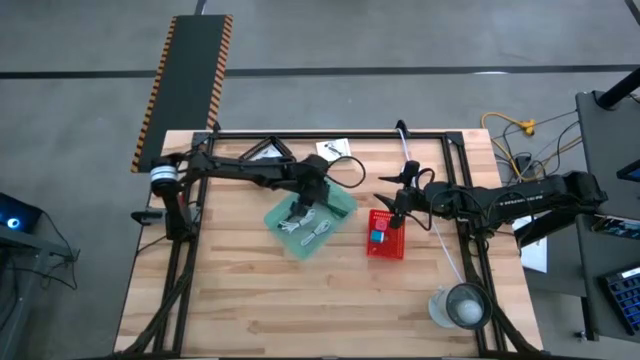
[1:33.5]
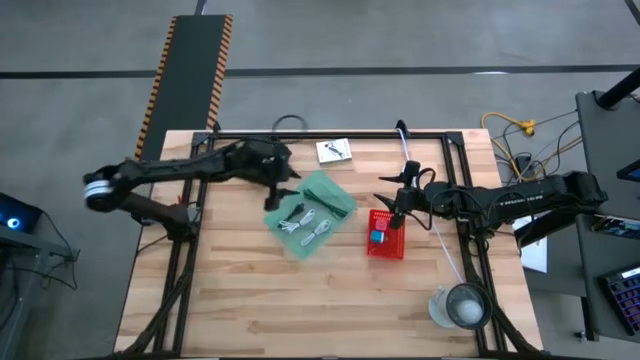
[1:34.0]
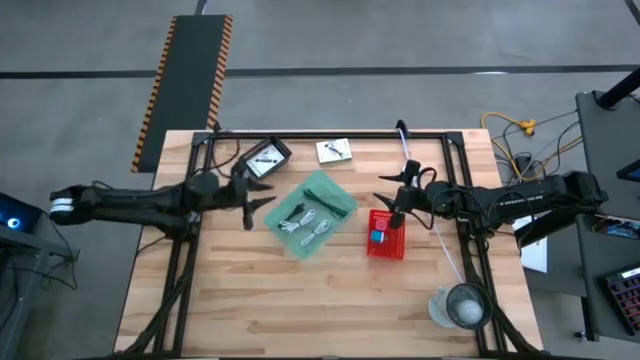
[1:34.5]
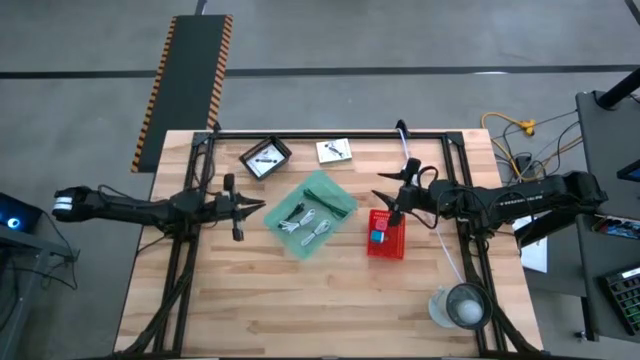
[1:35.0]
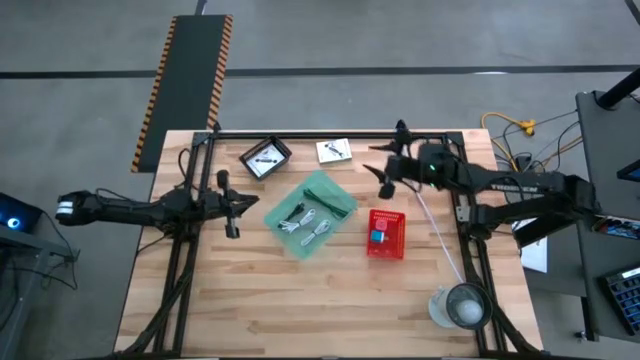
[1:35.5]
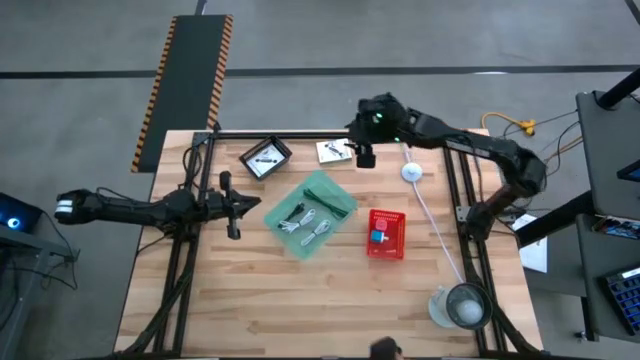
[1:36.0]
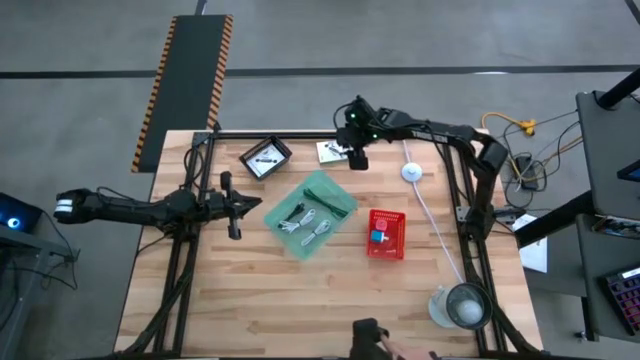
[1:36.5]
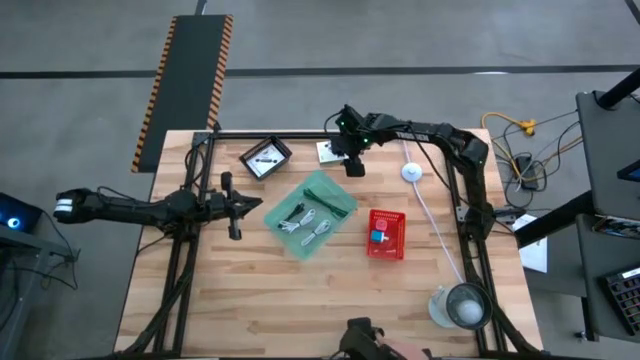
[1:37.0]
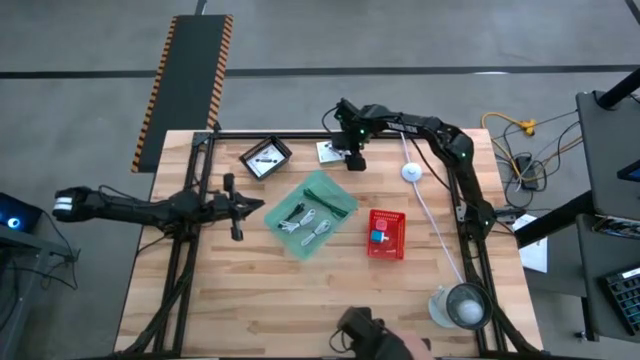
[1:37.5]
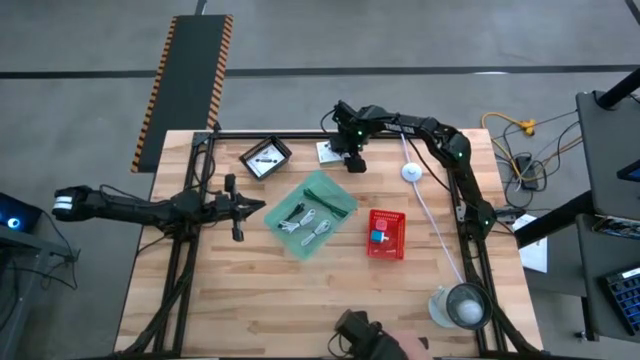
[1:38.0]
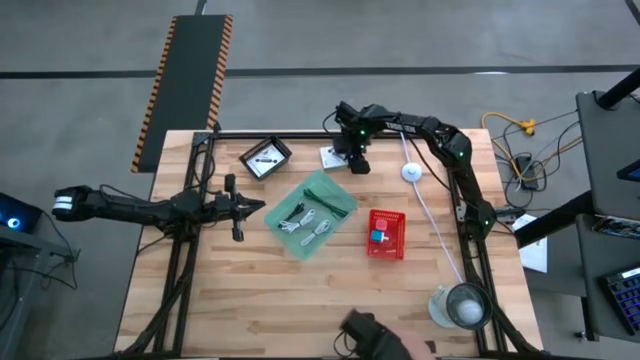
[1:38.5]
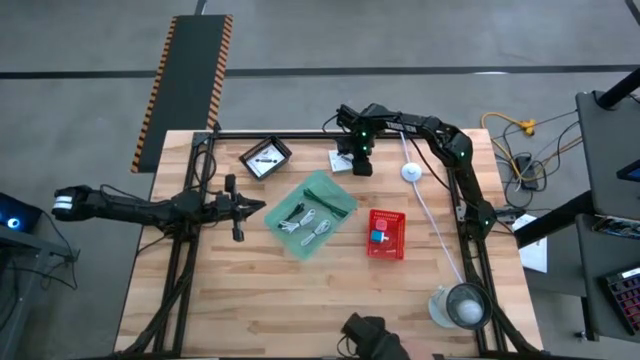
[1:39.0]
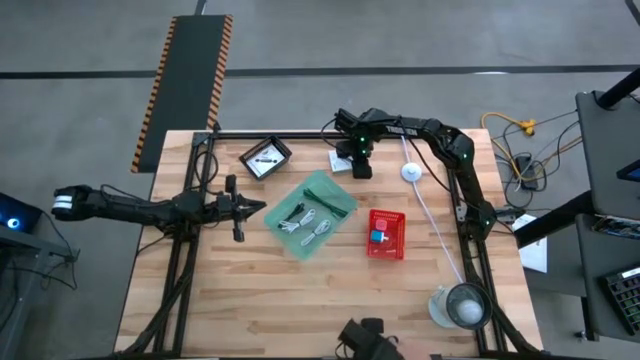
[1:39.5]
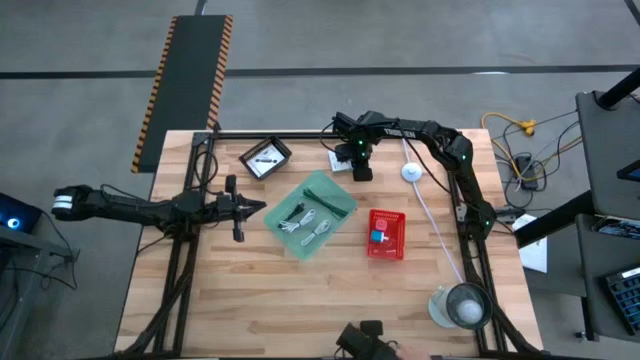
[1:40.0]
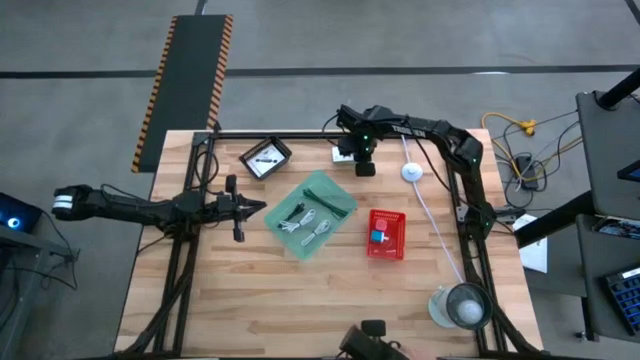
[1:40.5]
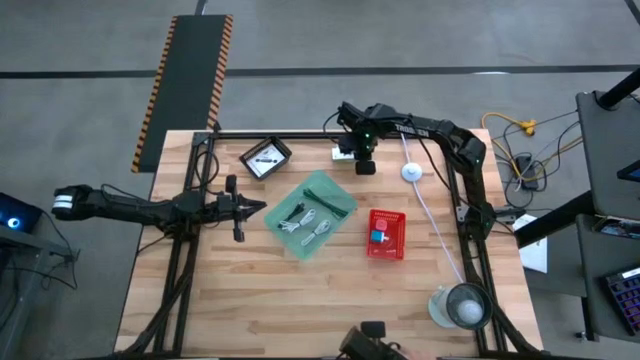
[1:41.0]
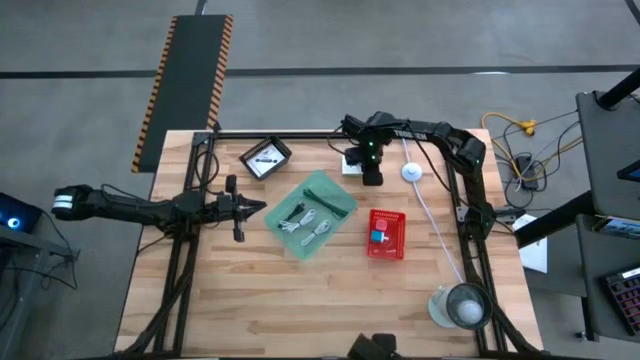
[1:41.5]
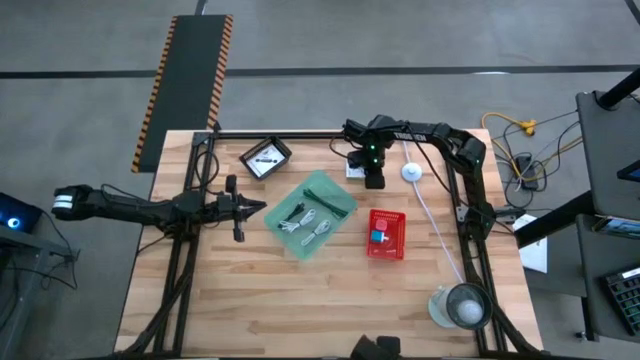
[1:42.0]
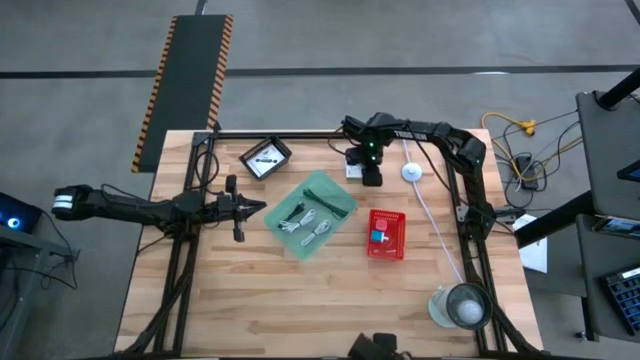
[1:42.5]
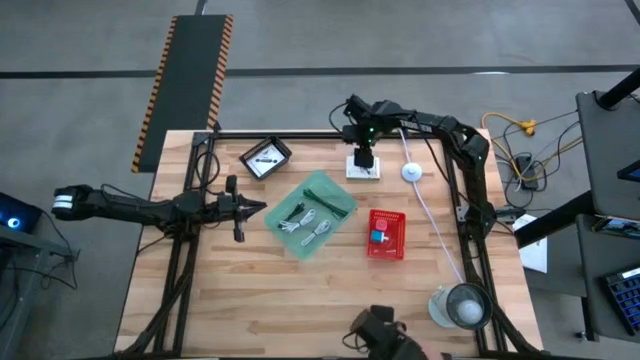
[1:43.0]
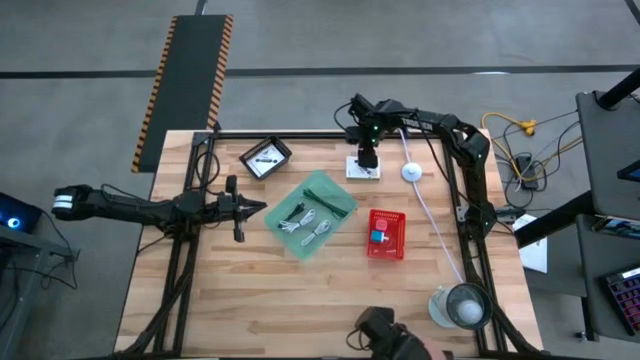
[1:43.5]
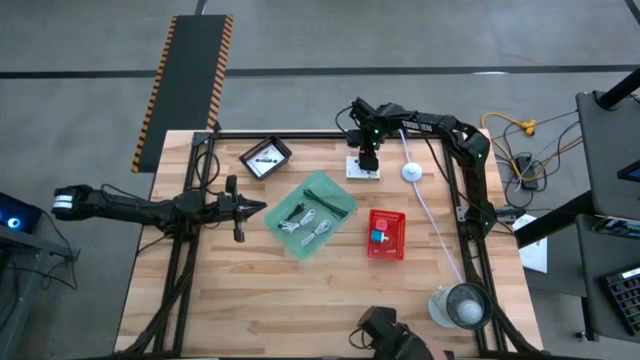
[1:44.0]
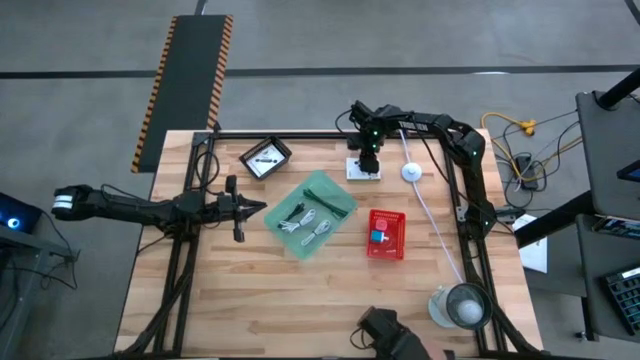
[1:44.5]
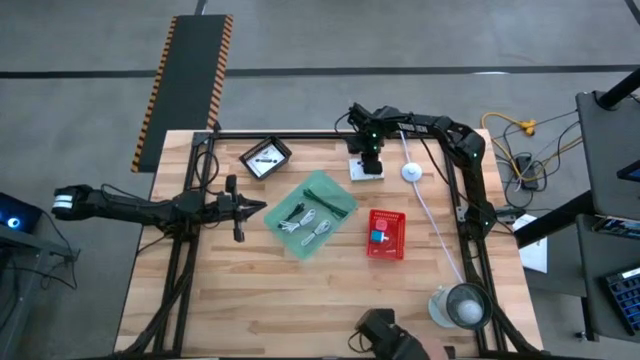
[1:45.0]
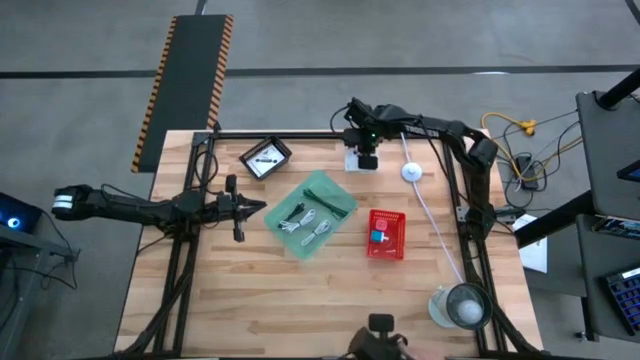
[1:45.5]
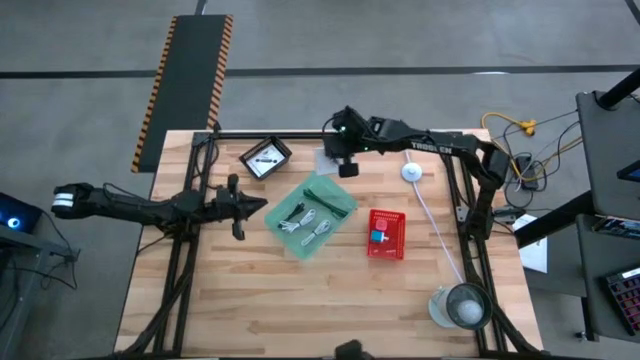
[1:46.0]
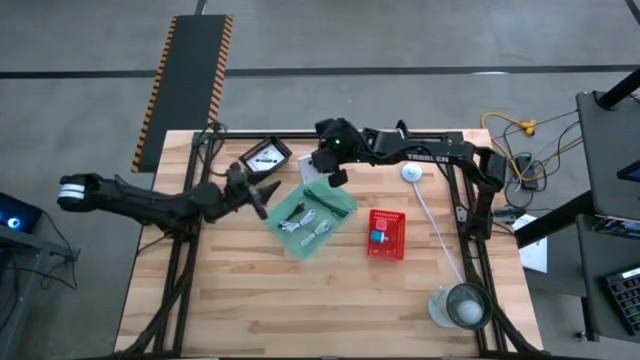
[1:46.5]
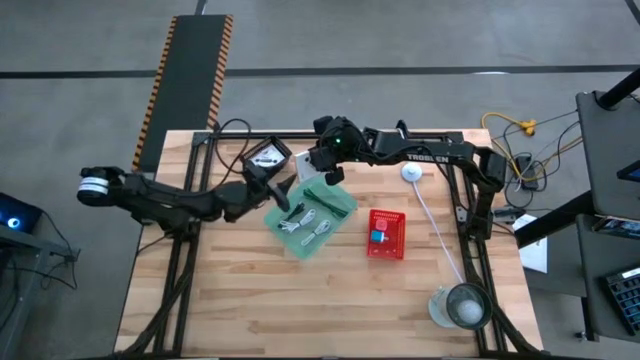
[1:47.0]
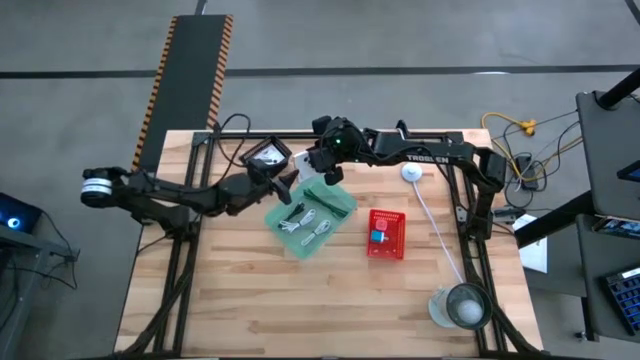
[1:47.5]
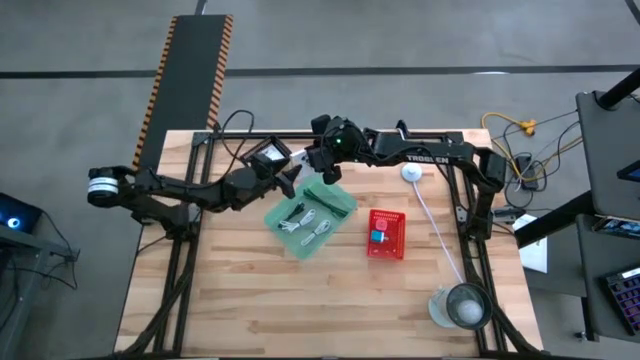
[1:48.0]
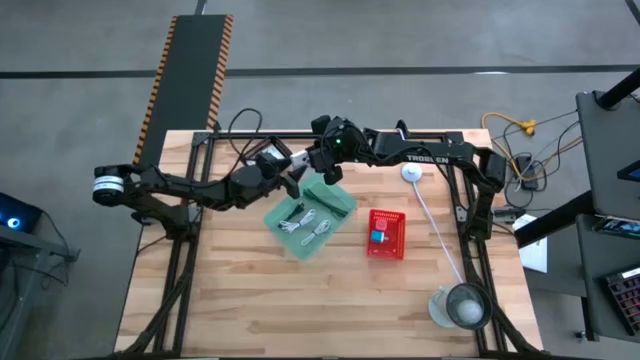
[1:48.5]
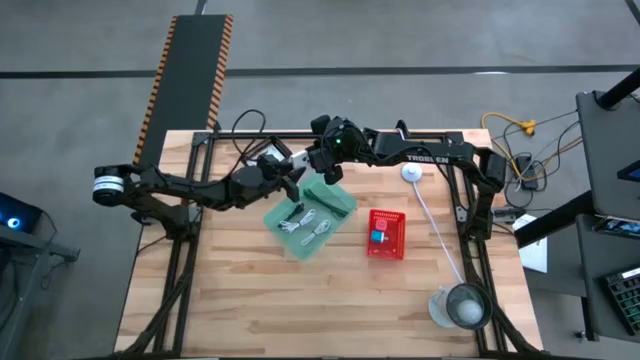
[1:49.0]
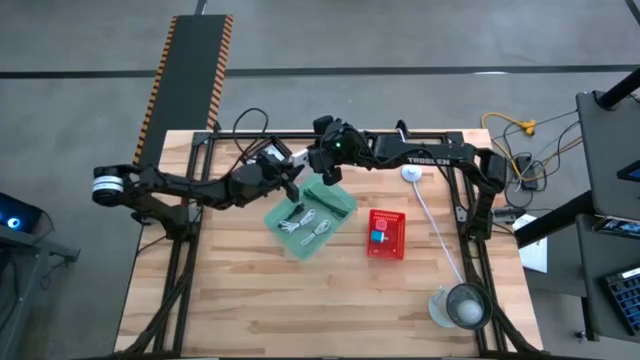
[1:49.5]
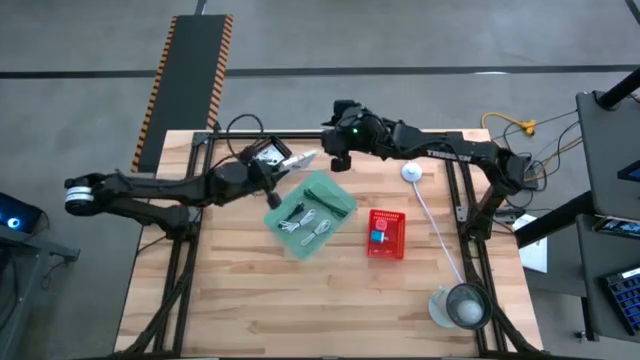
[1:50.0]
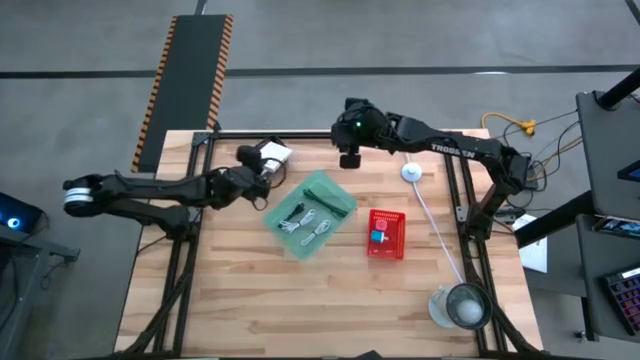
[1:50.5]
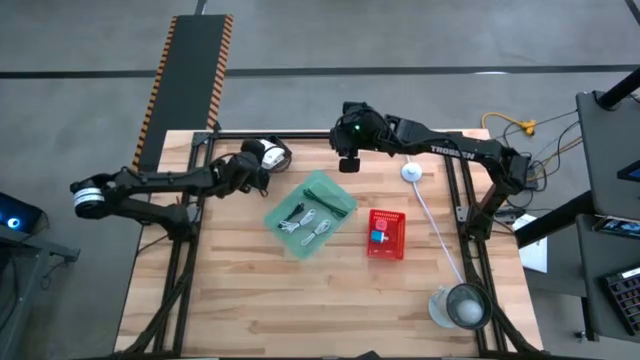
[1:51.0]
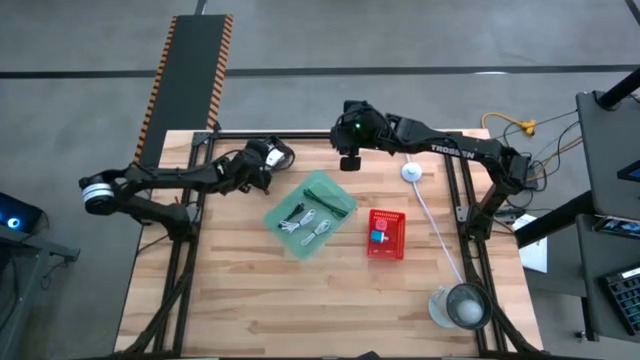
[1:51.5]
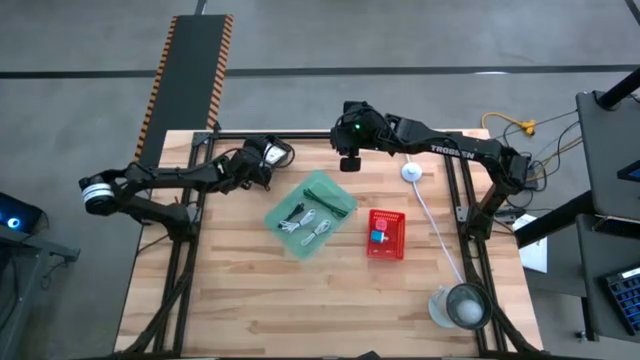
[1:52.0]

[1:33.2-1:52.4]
Task: Pick and place items into bin
Put the white card reader box into the black bin

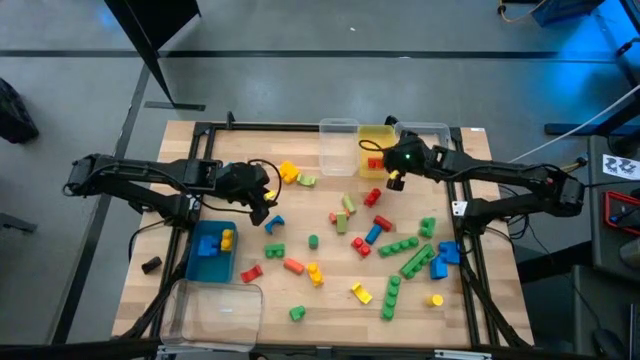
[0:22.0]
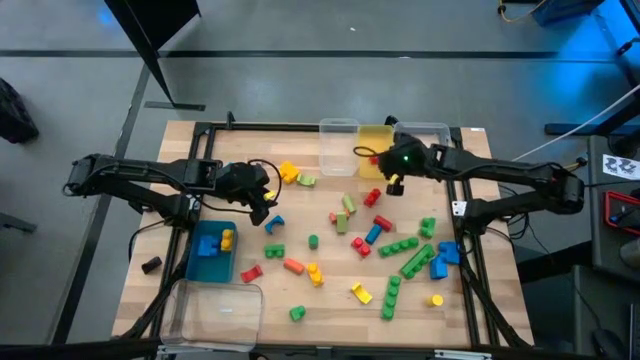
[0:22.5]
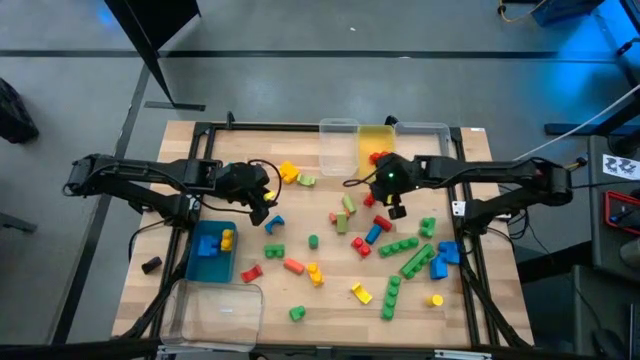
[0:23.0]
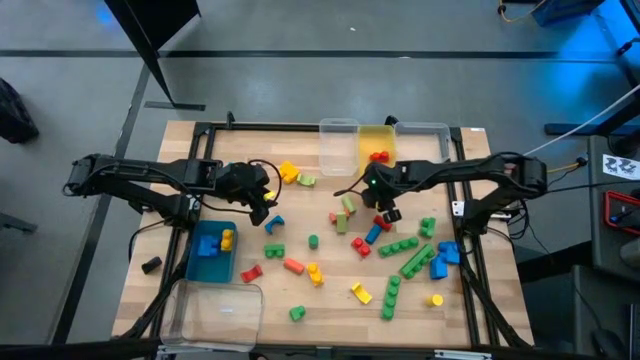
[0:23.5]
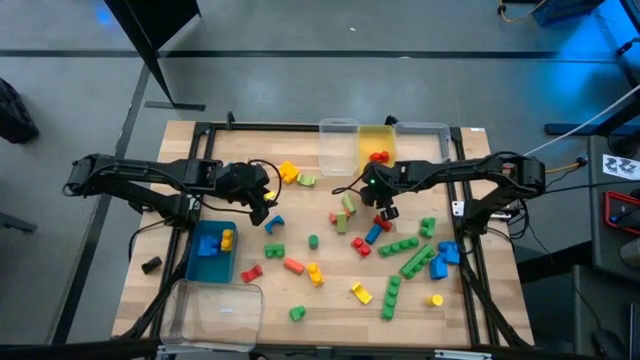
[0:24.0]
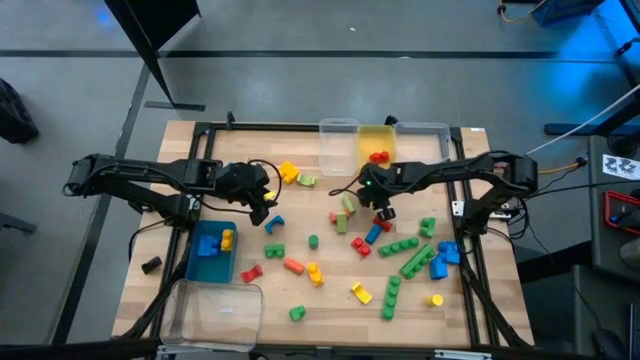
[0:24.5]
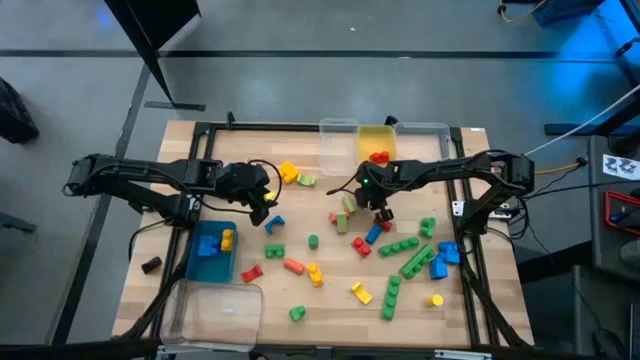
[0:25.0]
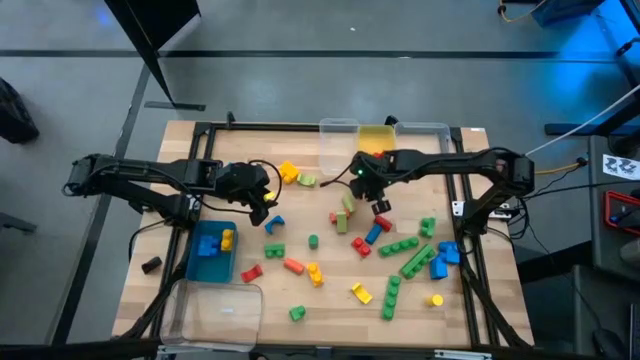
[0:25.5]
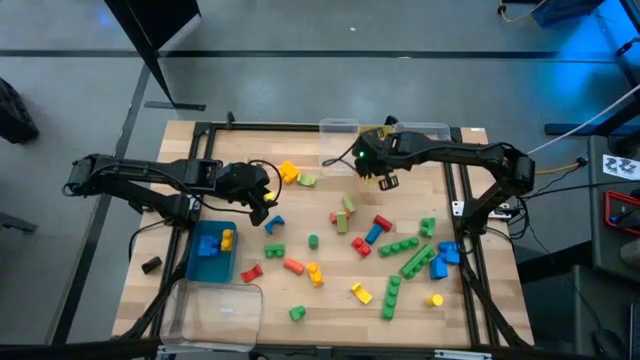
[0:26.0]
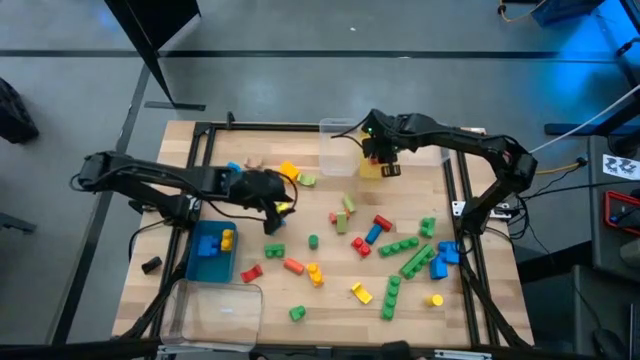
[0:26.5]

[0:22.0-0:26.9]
Task: Sort blocks by size
Put the red 2 stud game piece into the yellow bin
